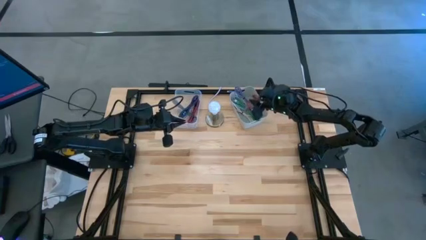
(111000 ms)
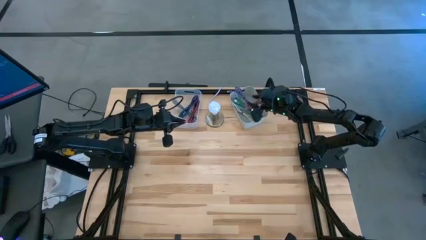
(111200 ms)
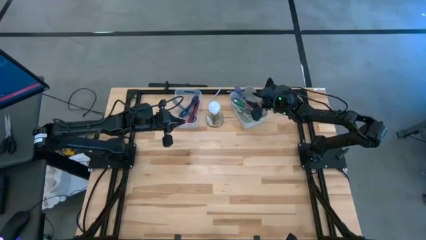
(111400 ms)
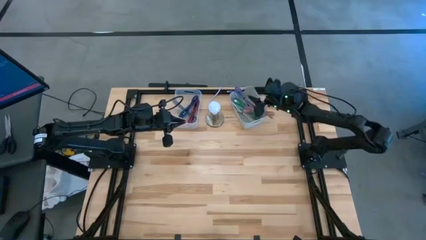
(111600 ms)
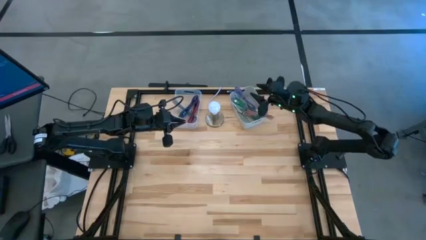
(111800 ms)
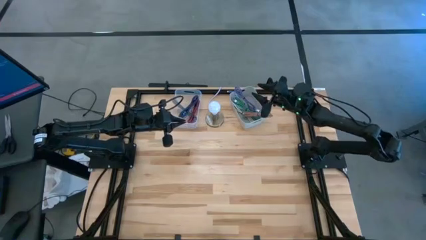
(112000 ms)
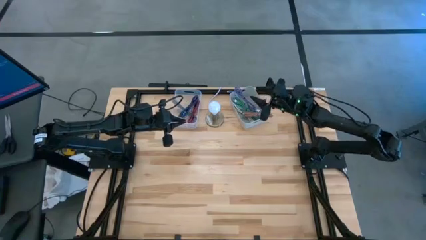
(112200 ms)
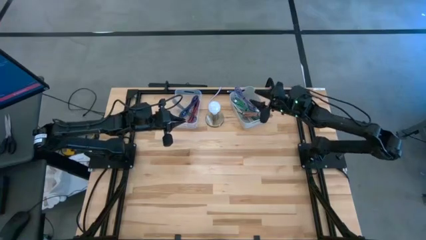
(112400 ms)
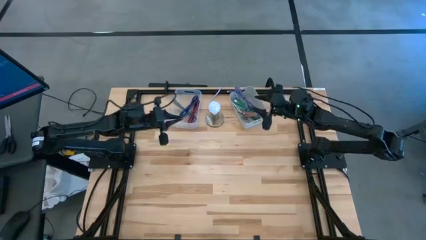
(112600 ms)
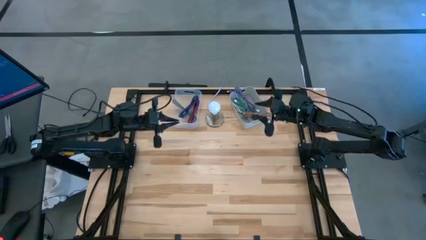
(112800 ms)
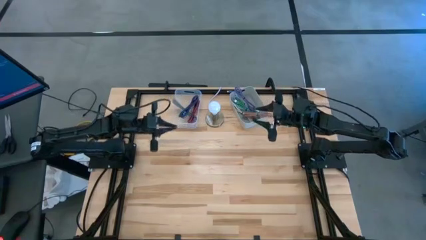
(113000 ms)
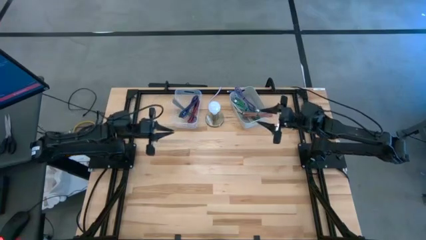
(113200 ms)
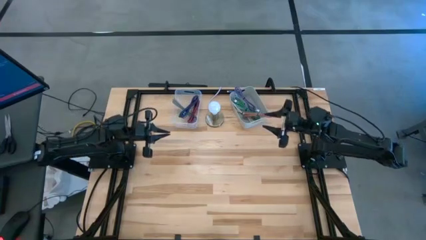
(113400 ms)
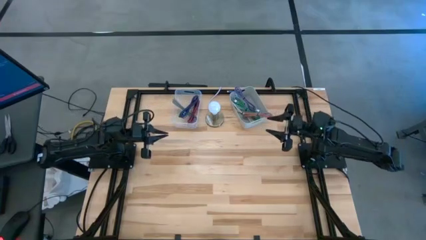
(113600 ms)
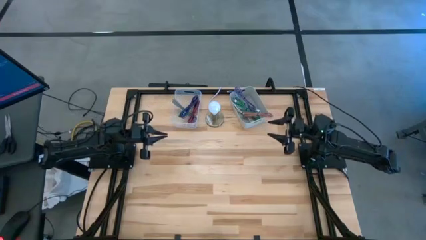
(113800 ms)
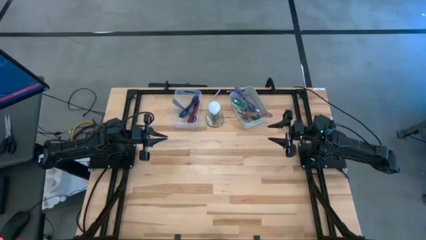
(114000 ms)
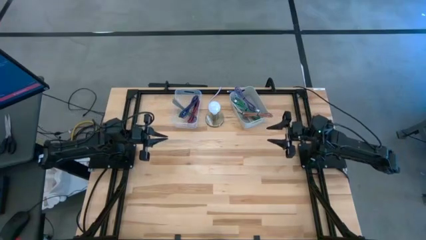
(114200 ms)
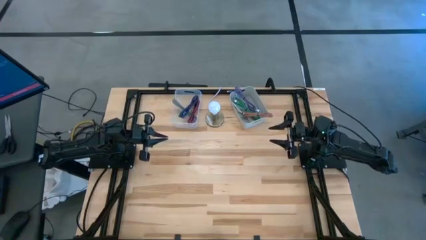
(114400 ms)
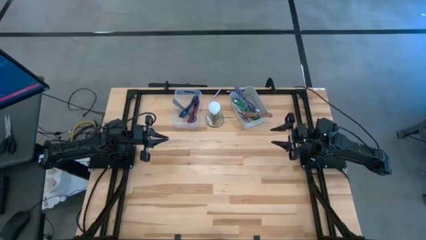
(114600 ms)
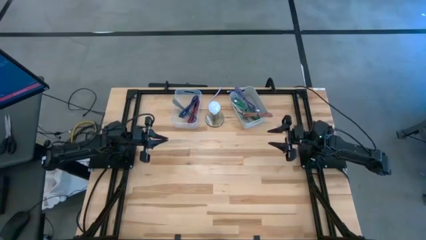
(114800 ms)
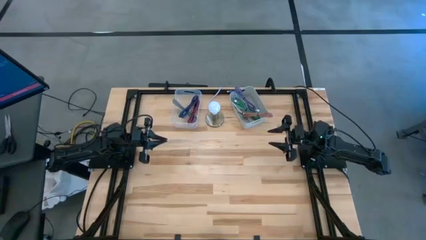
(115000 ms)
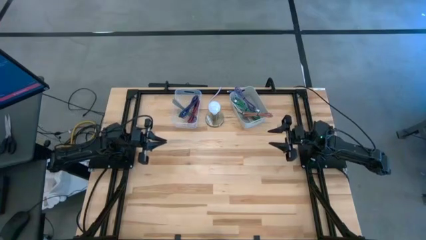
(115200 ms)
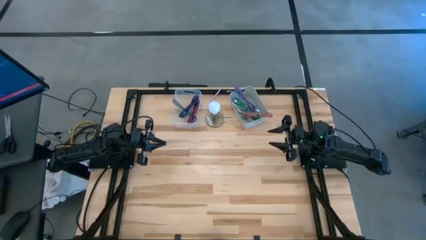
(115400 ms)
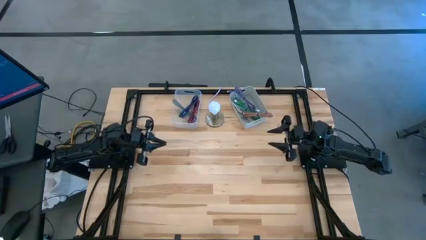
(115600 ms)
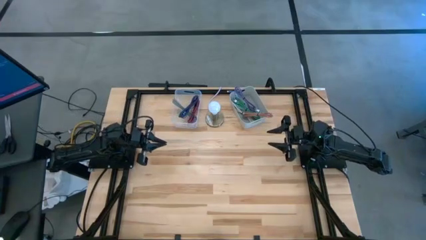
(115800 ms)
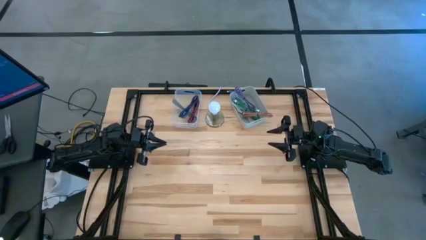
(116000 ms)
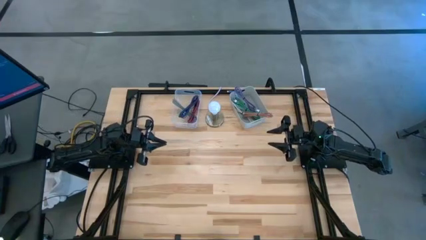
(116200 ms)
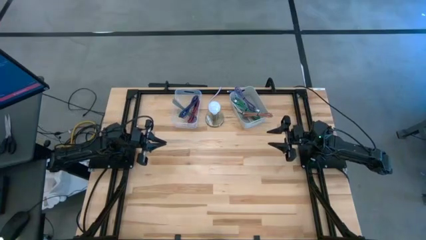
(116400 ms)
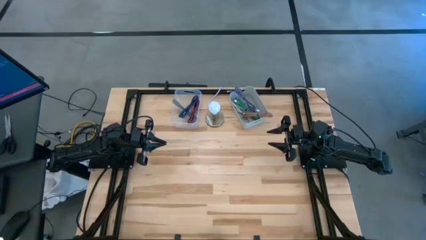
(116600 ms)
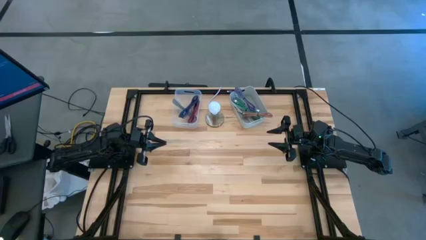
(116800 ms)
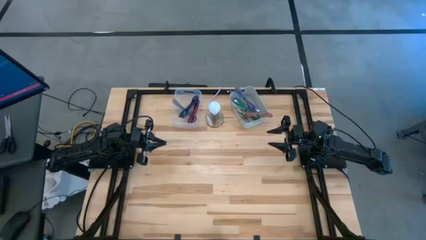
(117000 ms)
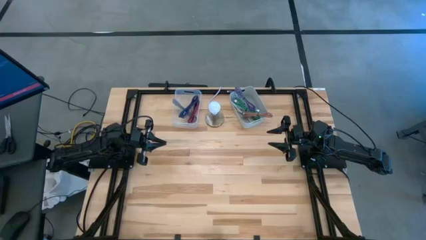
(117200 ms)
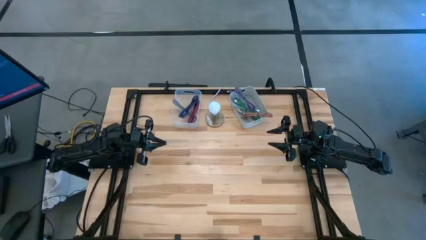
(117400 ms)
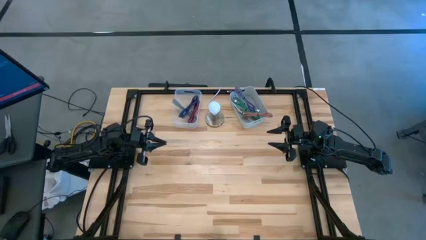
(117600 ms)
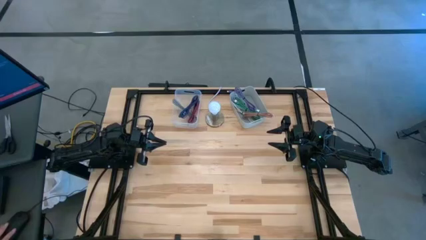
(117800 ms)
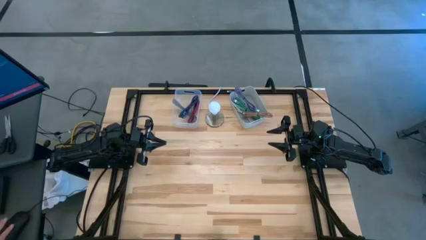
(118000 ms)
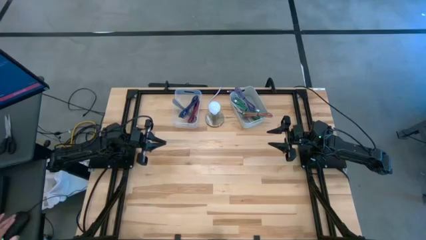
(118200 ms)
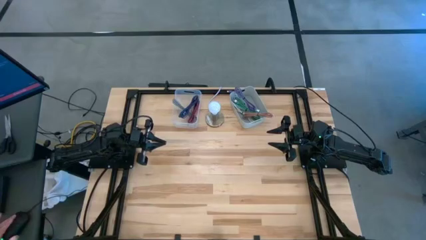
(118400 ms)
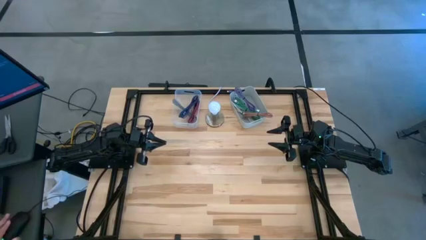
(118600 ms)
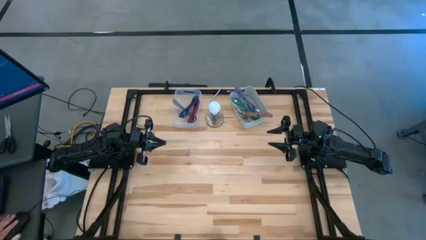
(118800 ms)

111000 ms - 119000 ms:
Task: Pick & Place USB Port
Return to Home Position

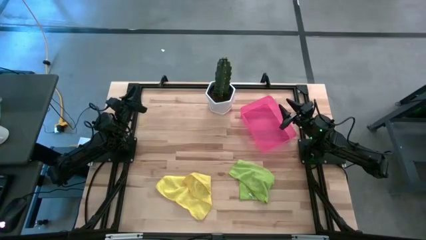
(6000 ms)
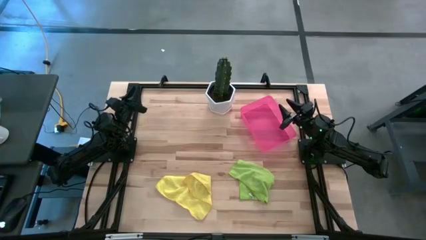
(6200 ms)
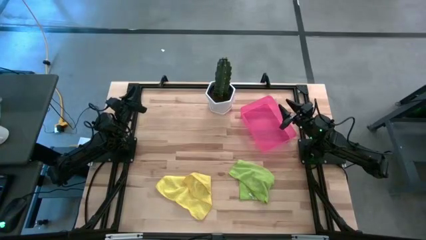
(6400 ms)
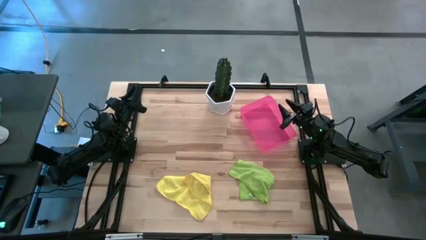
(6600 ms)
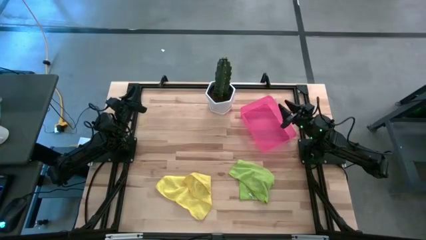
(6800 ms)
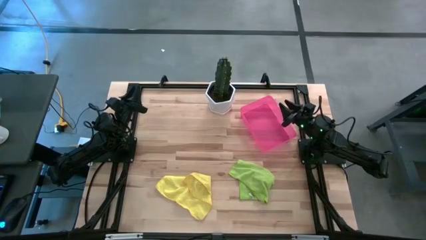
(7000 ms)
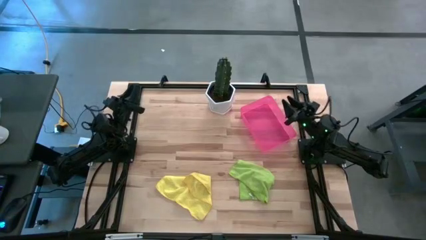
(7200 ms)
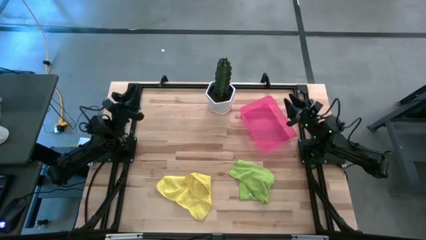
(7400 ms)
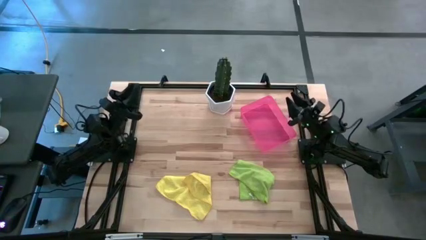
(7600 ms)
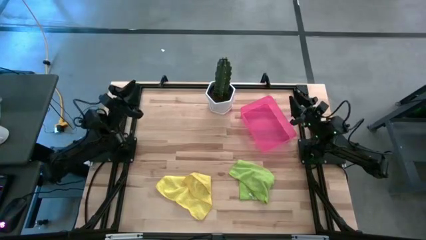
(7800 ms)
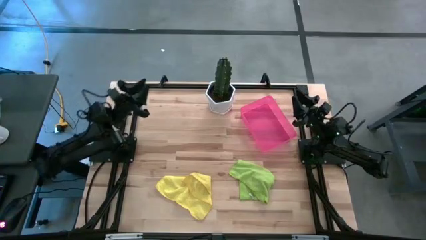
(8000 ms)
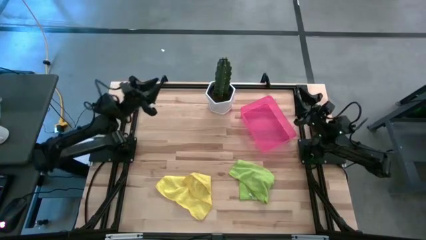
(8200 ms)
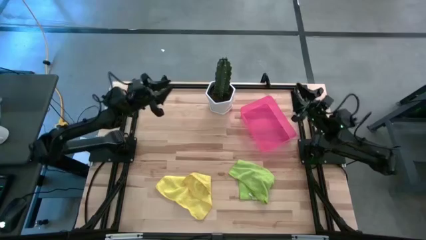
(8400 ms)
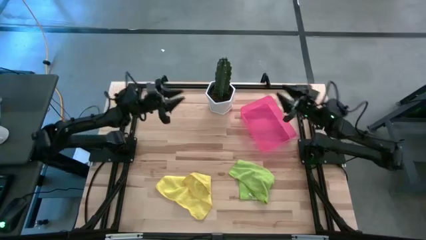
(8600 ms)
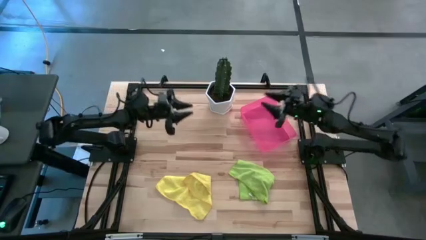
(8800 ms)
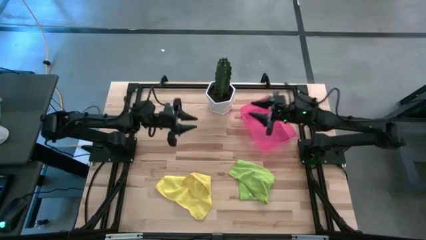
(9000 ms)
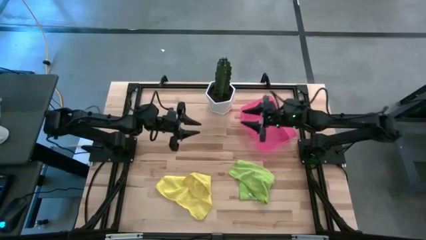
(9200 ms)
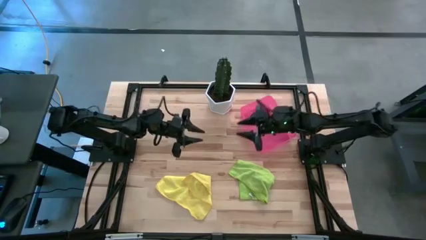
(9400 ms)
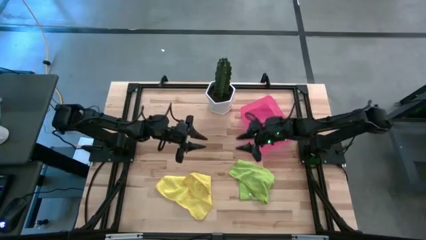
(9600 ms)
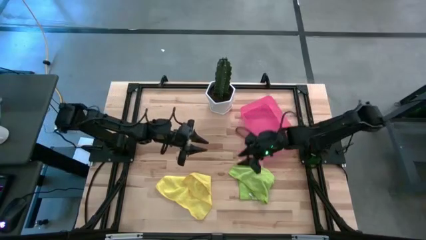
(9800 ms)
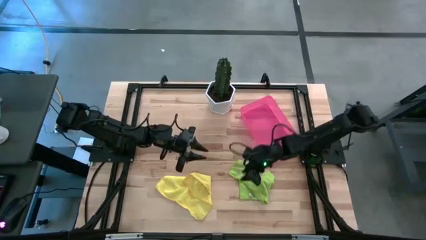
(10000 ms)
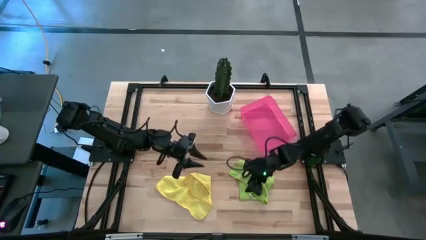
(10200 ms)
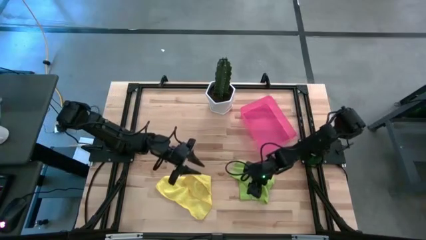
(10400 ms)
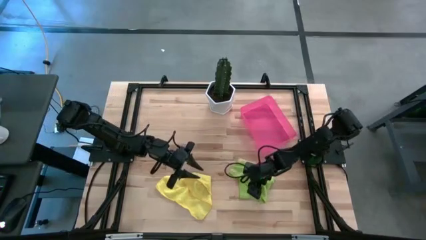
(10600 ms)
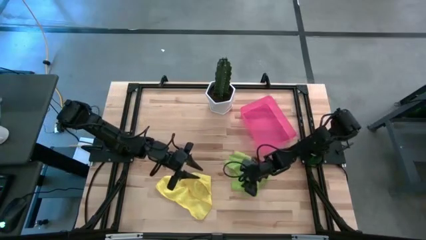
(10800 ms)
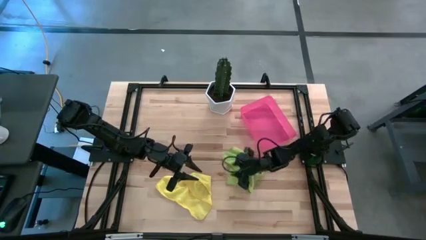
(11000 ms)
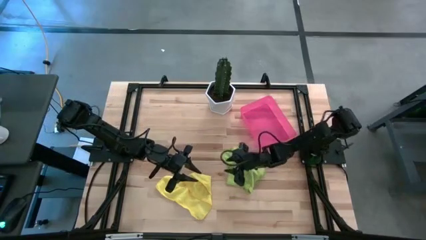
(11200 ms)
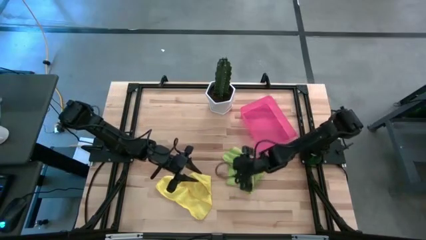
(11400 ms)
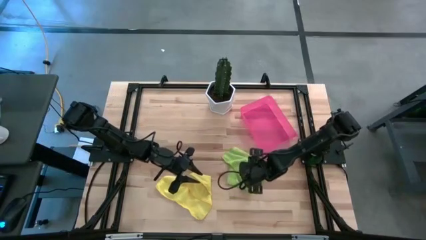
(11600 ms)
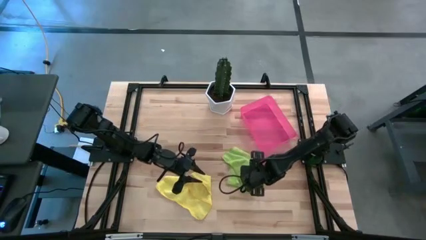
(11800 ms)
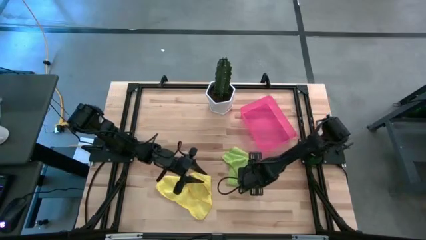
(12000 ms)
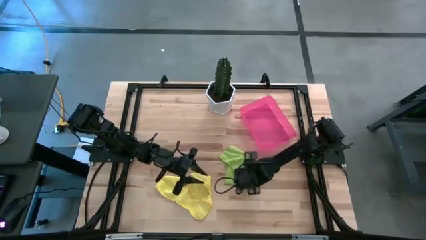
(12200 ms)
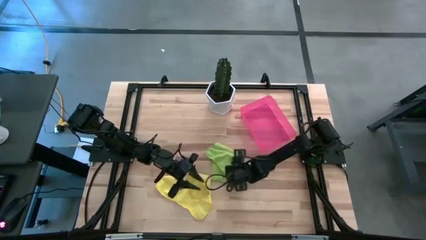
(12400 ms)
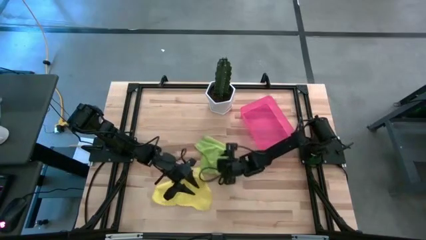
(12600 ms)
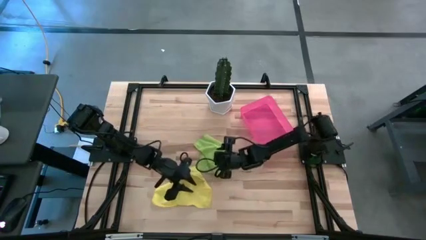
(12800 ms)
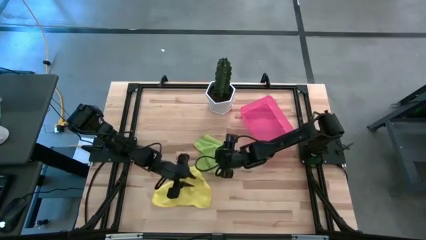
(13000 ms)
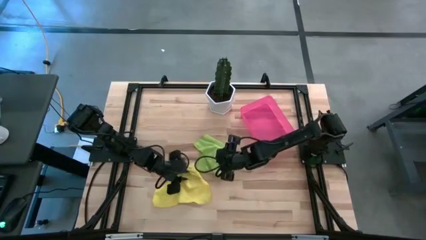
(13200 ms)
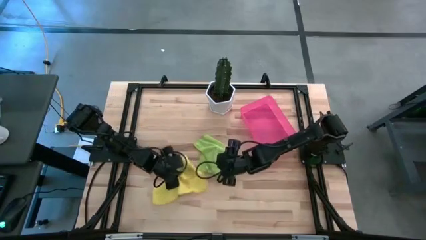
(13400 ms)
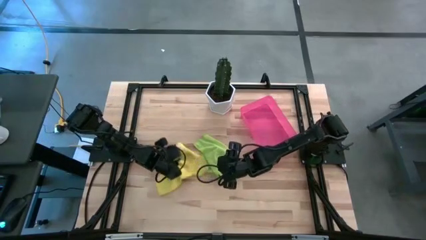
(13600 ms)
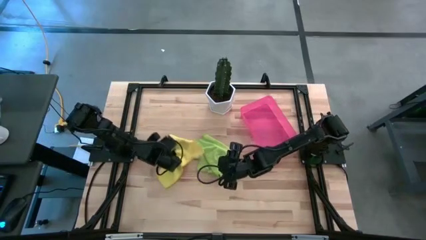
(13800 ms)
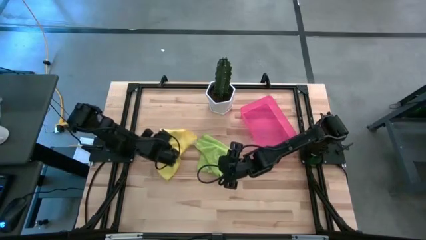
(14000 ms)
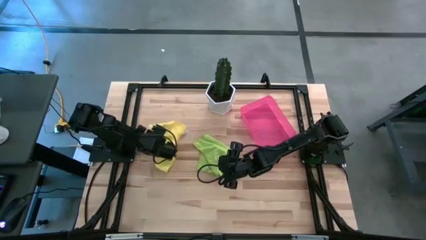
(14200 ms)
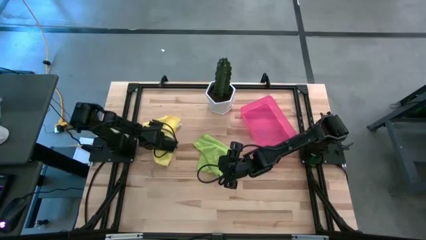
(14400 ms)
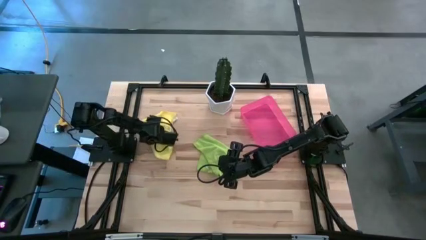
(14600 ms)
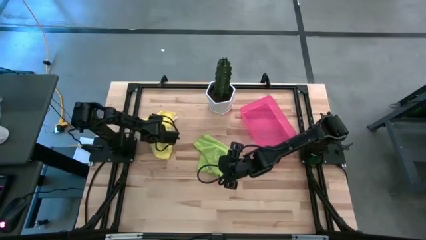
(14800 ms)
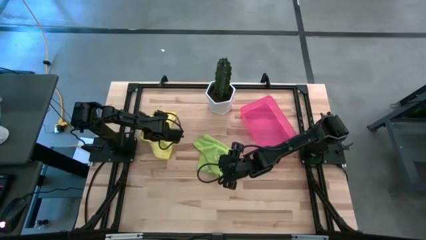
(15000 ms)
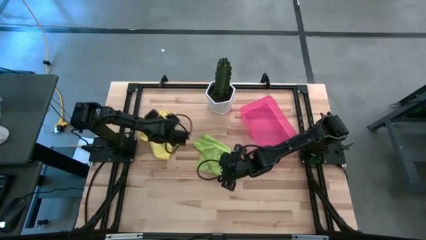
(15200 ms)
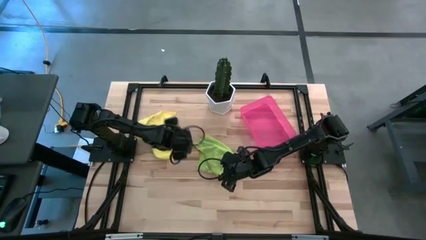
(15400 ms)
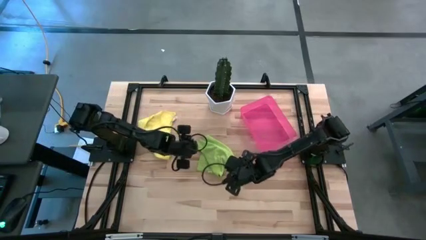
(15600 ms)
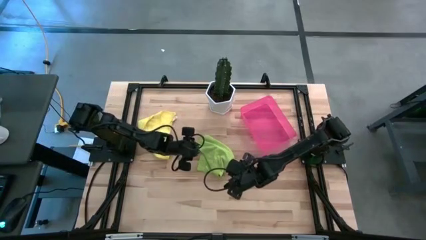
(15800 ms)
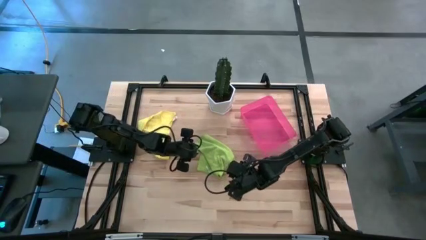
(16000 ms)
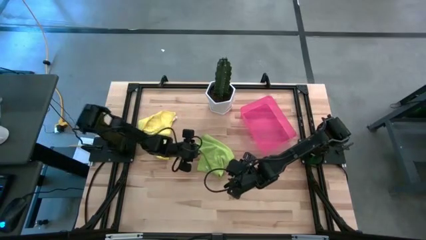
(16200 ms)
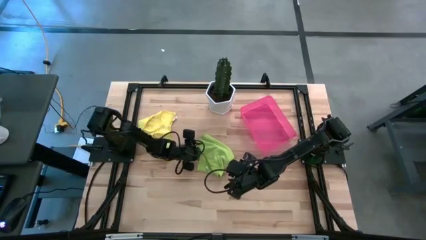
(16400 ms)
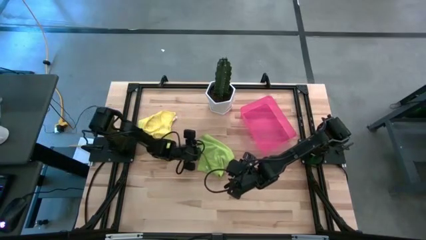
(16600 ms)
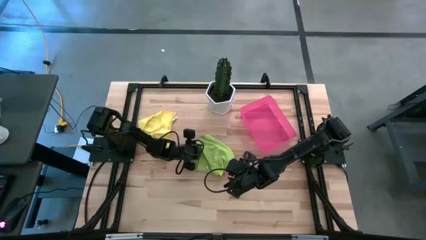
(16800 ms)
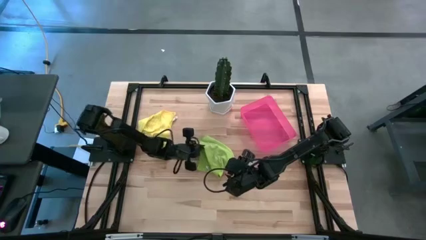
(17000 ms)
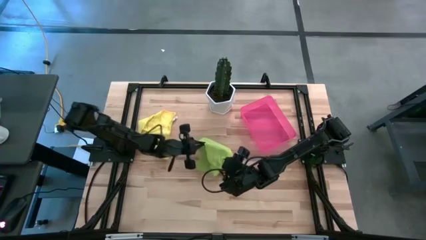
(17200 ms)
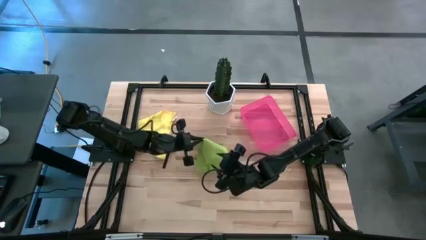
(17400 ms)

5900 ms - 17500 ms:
Task: Roll microfiber towels into tight, uniform cylinder then place into a basket
Fold the green towel
